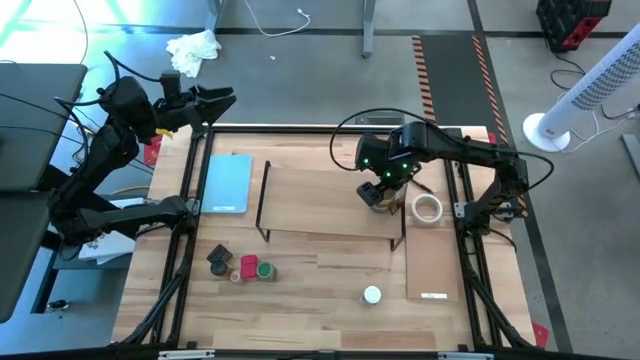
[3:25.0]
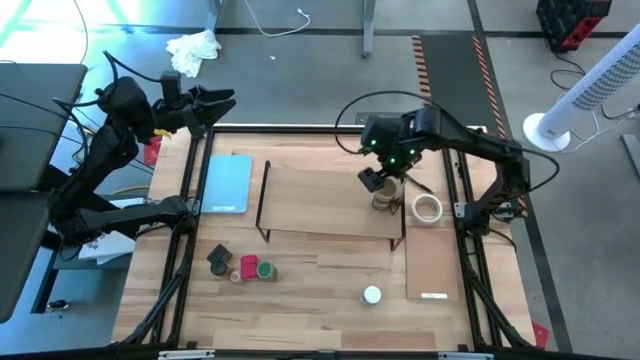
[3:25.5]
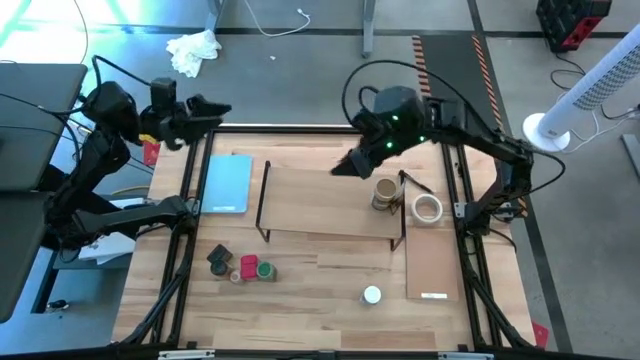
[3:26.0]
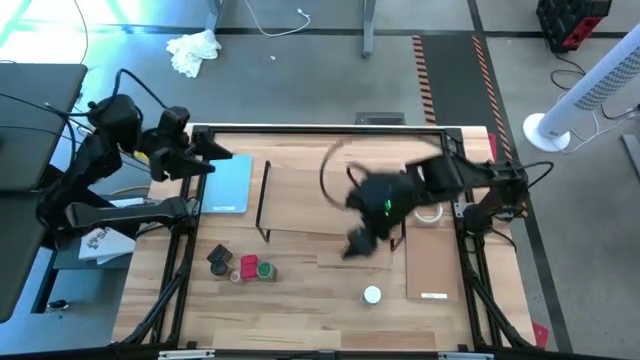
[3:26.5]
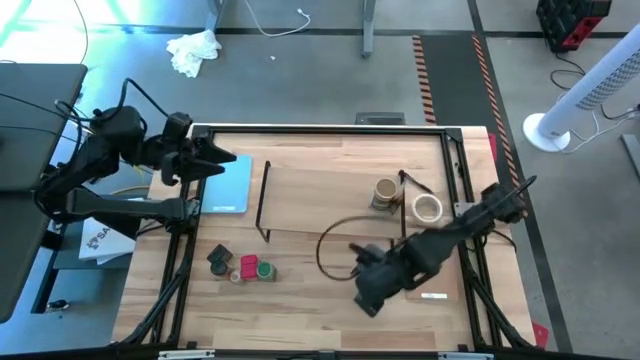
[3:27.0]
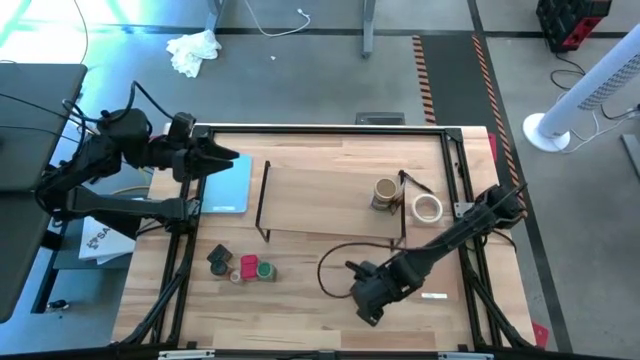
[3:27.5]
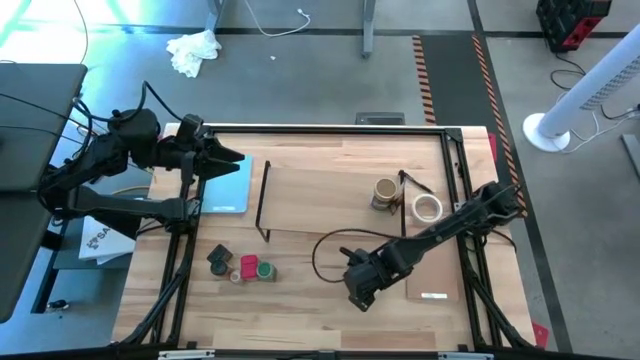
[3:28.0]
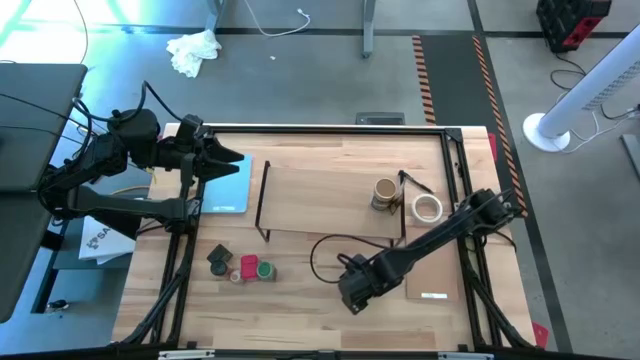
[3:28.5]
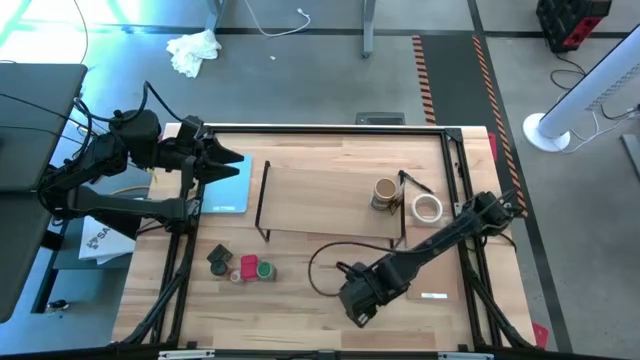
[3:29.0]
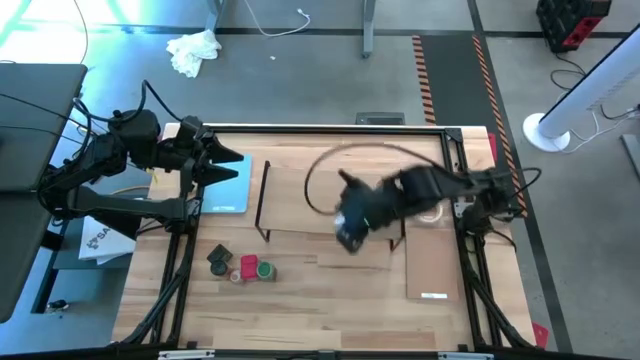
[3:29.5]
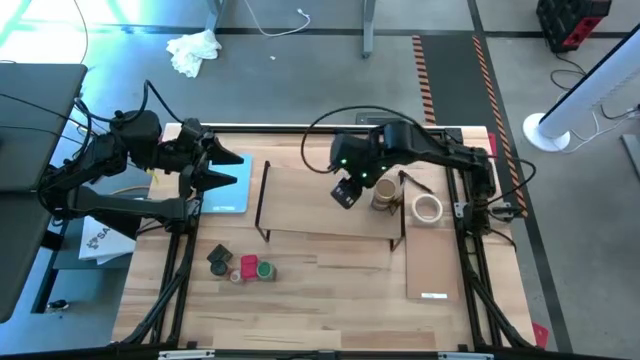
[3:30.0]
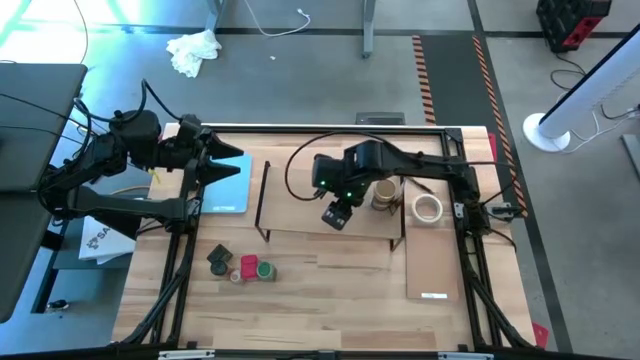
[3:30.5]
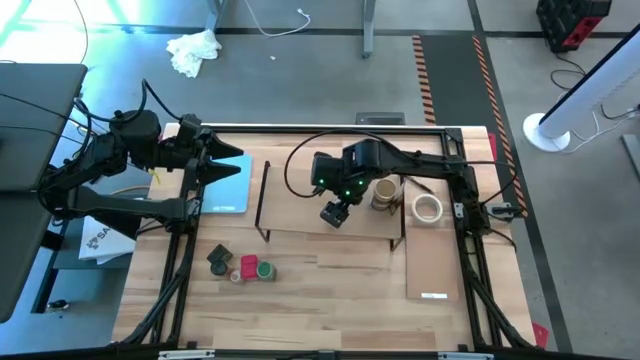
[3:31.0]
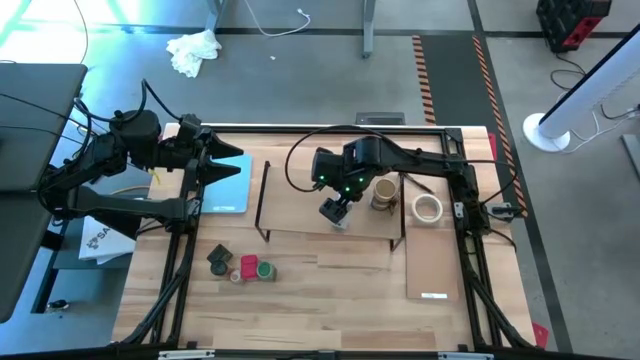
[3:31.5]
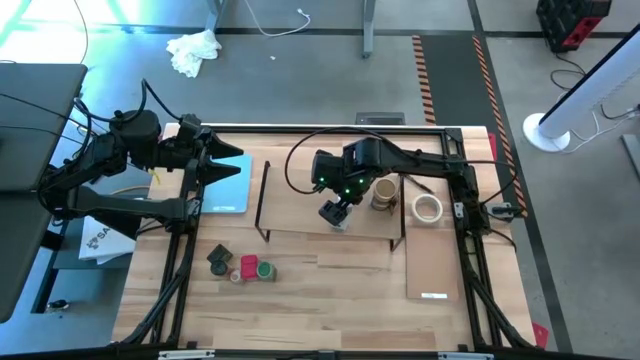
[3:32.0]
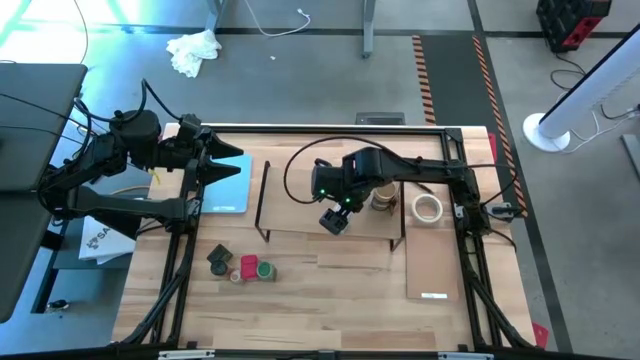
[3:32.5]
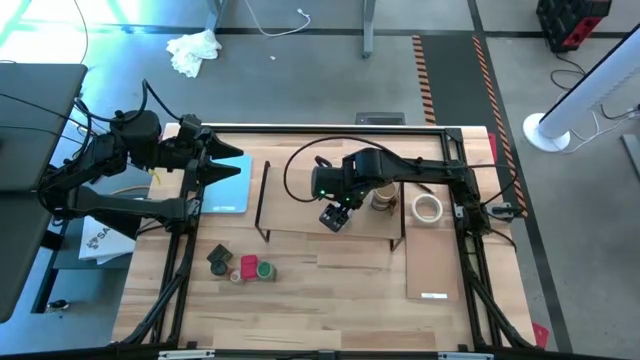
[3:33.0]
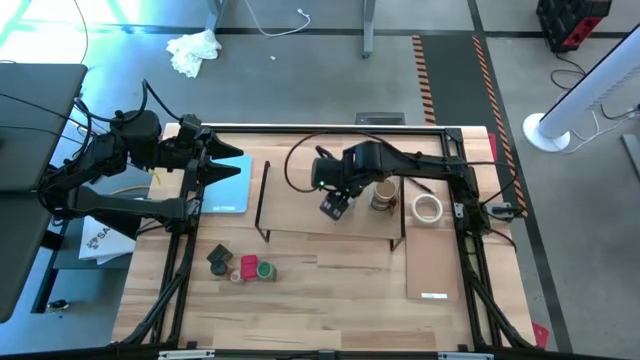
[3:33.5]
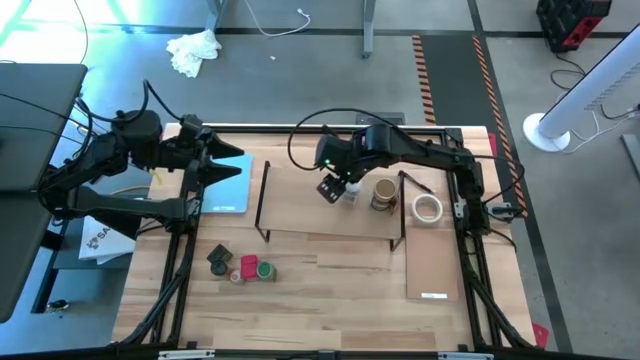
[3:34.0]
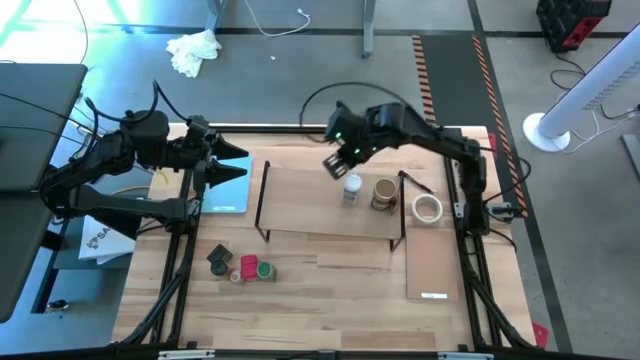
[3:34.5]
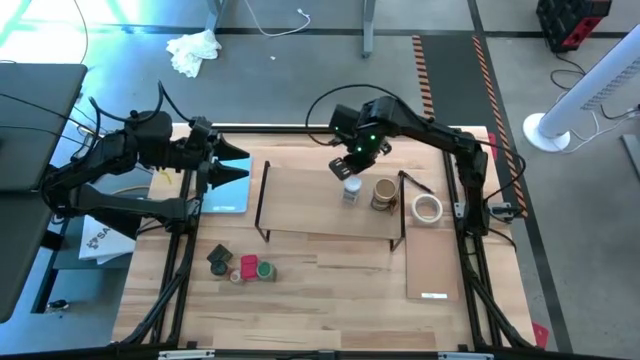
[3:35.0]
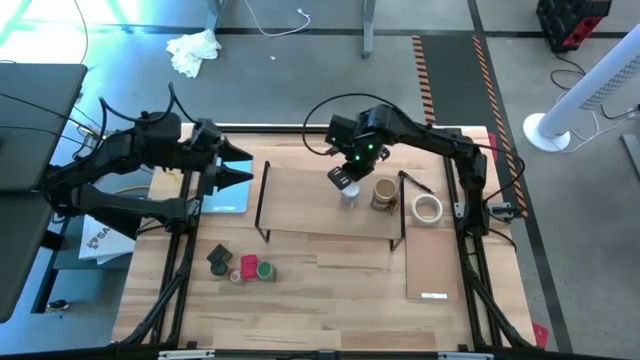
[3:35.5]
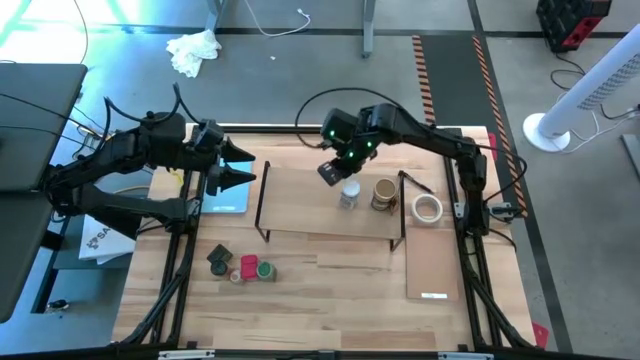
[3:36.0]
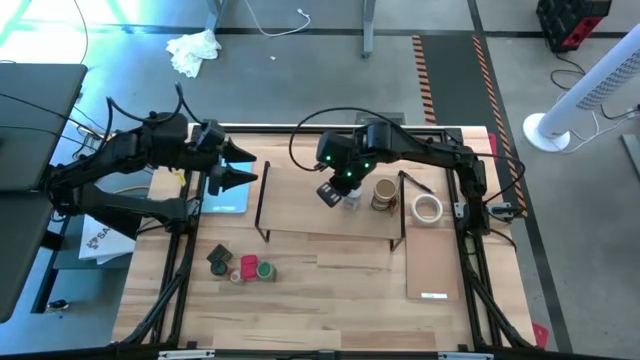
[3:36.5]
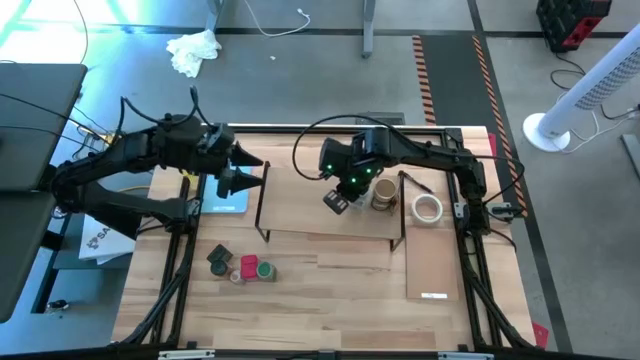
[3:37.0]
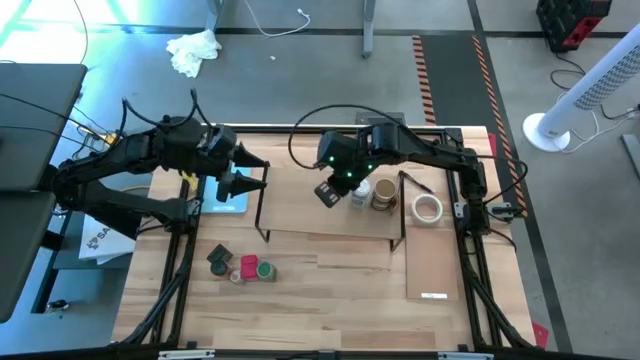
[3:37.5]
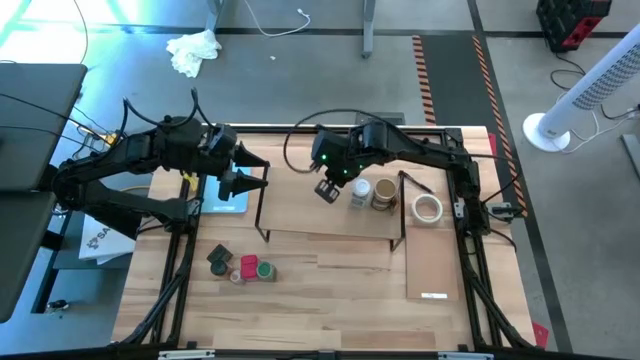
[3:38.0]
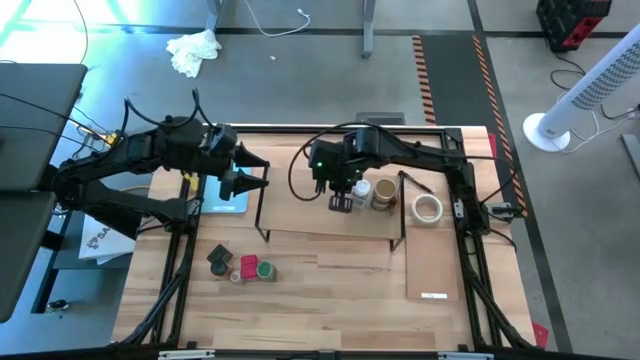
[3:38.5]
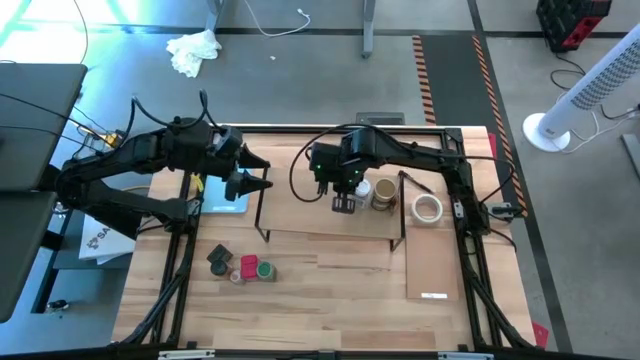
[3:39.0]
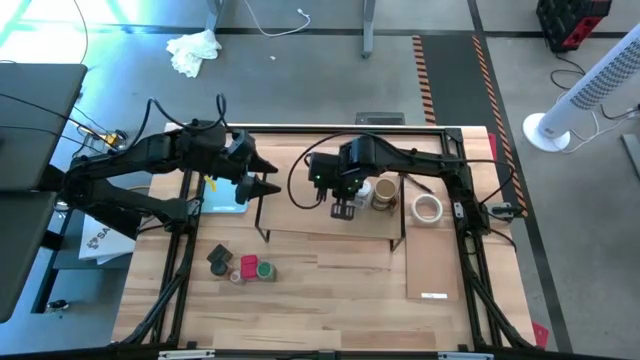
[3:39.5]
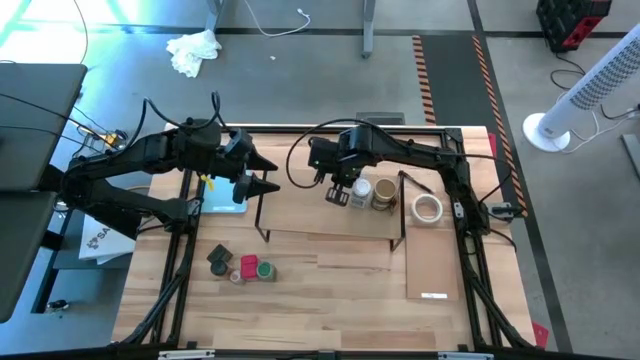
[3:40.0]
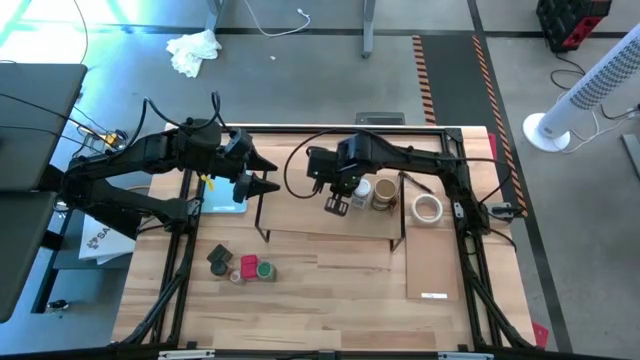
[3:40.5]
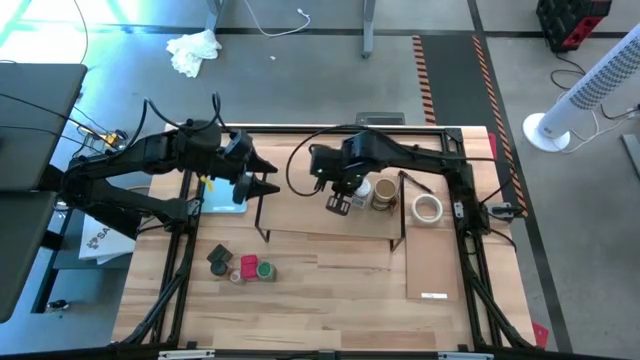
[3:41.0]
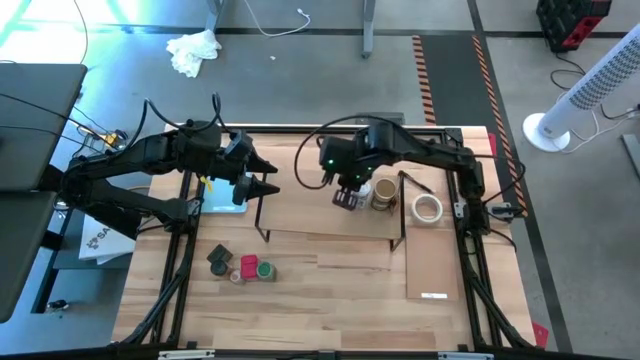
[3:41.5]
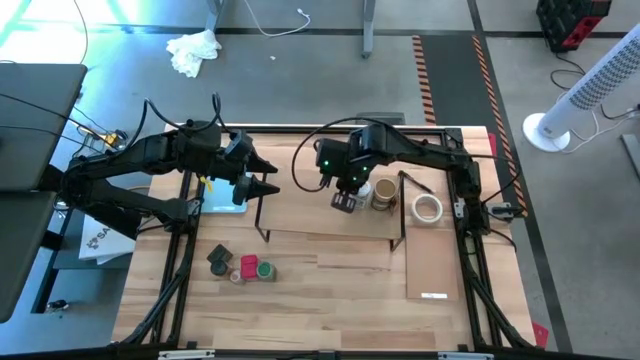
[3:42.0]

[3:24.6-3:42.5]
Task: Shelf spices
Put the white seasoning bottle on the shelf
